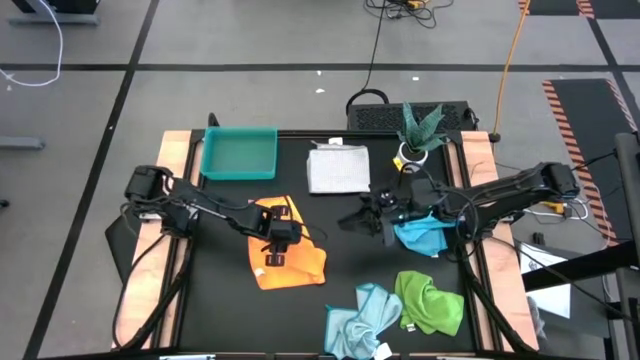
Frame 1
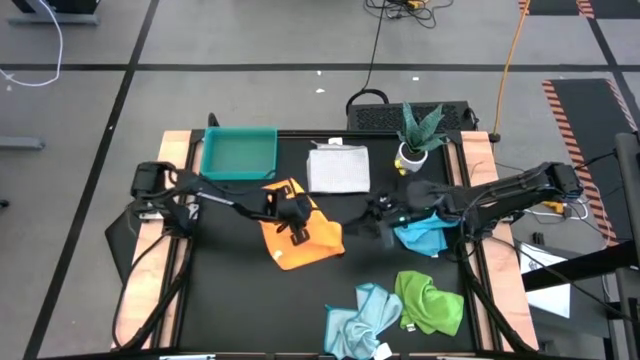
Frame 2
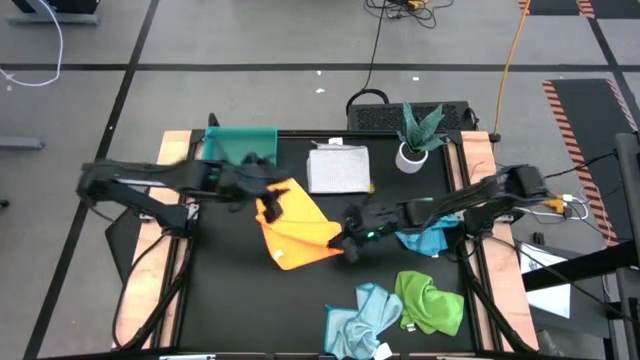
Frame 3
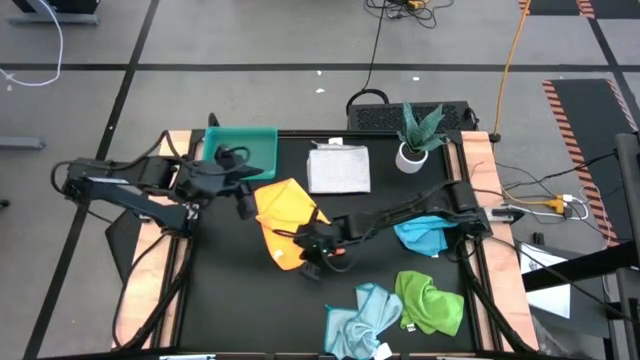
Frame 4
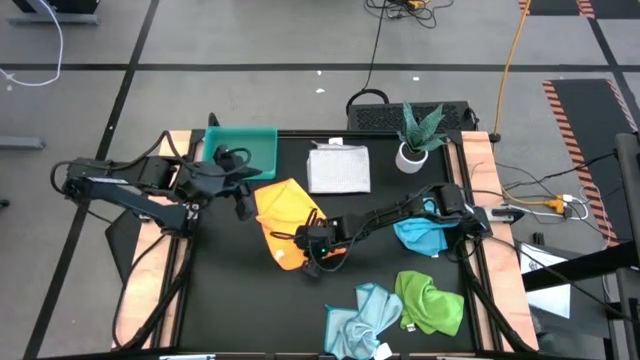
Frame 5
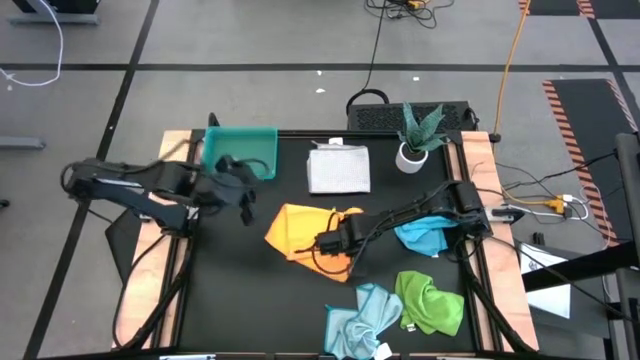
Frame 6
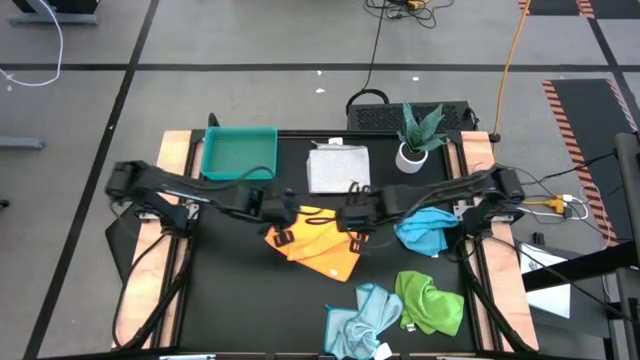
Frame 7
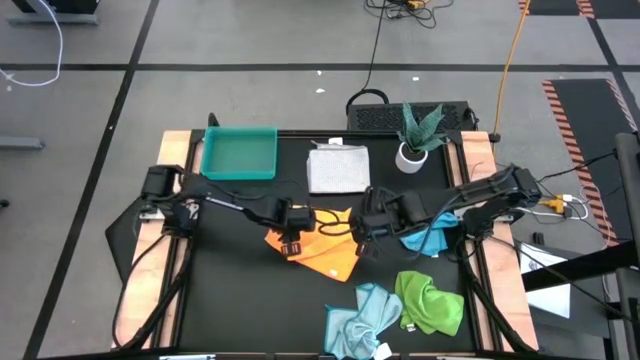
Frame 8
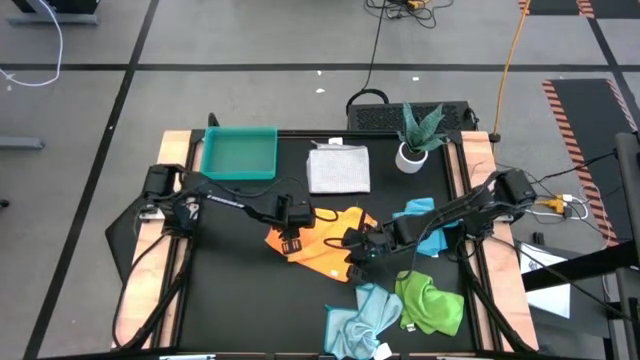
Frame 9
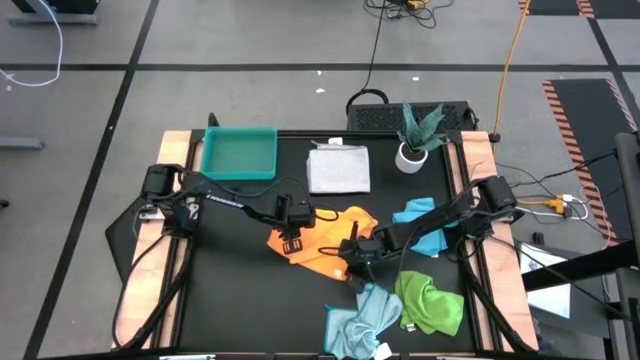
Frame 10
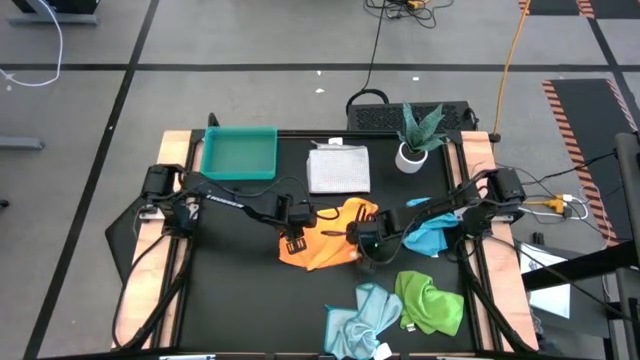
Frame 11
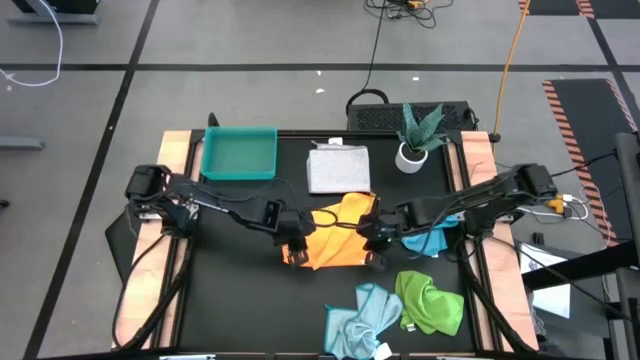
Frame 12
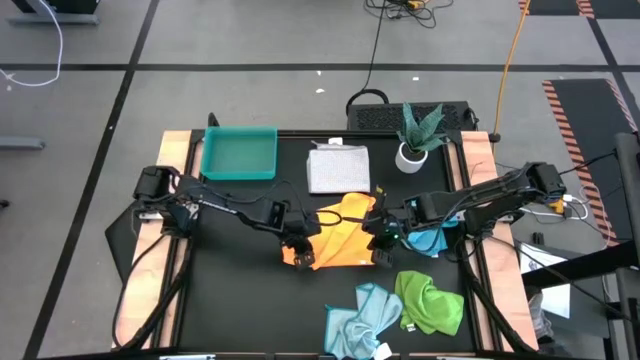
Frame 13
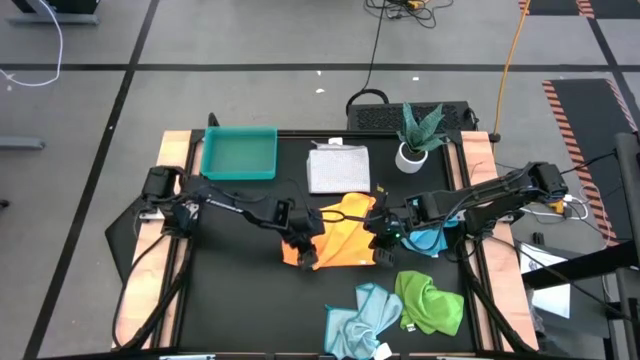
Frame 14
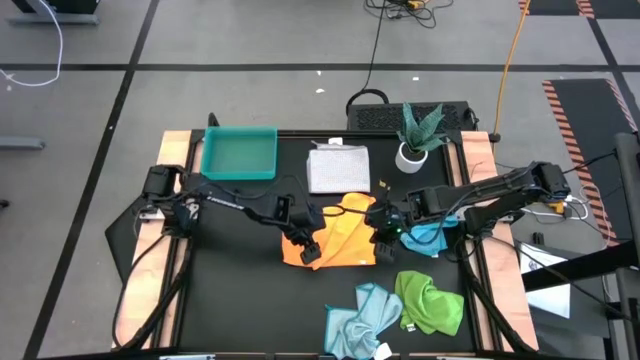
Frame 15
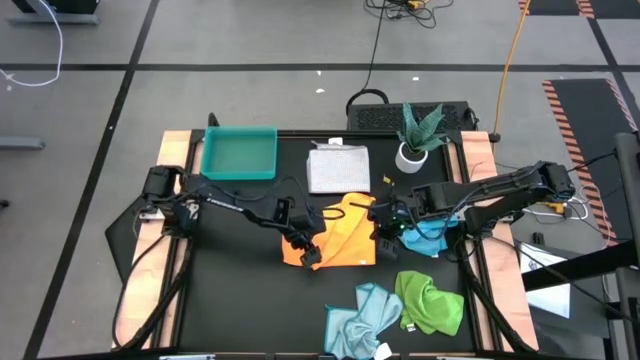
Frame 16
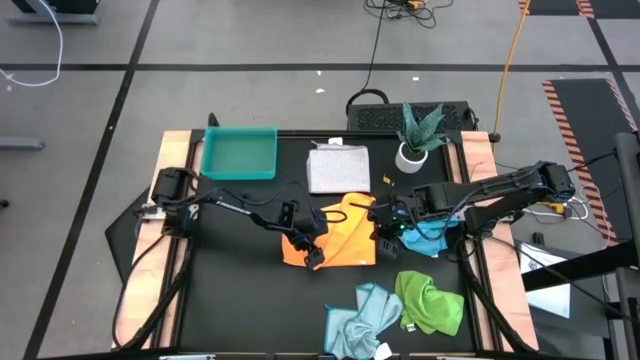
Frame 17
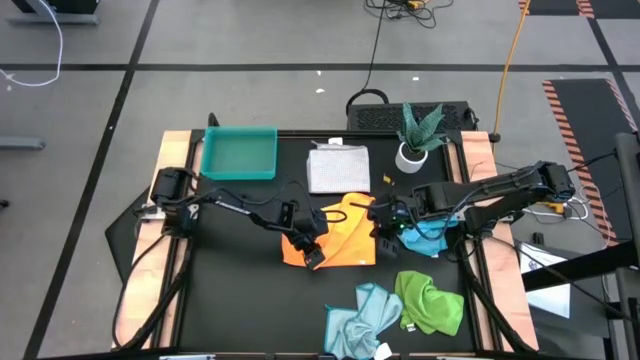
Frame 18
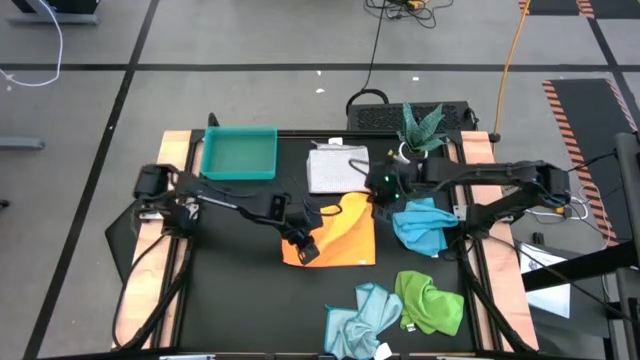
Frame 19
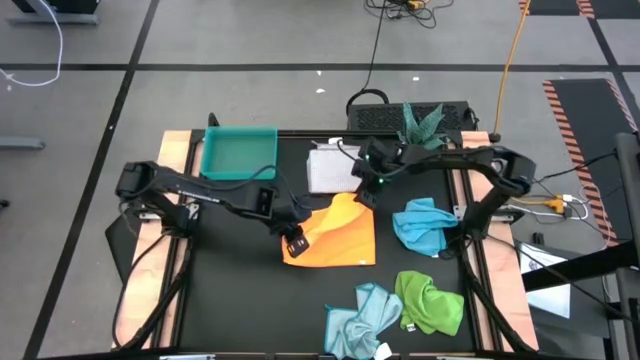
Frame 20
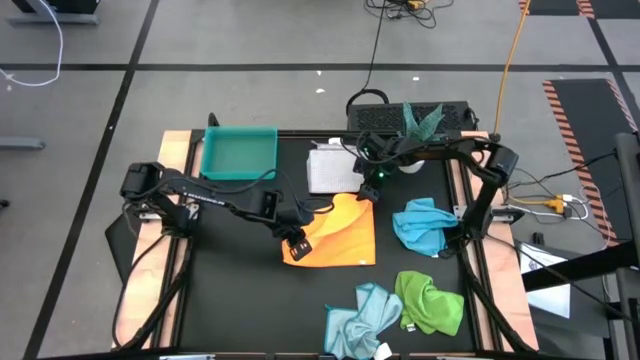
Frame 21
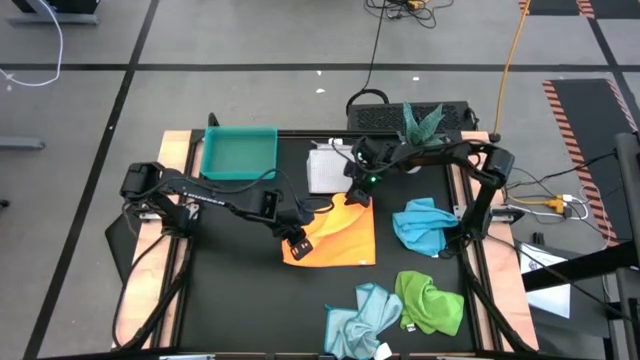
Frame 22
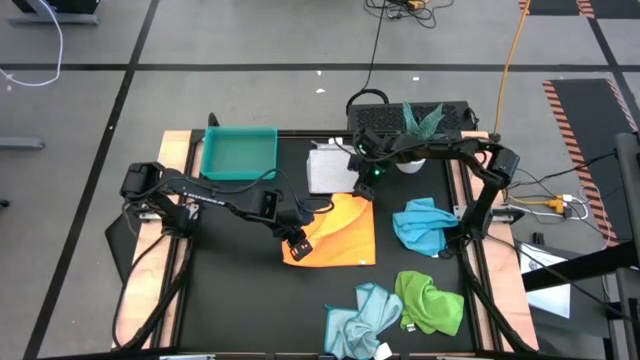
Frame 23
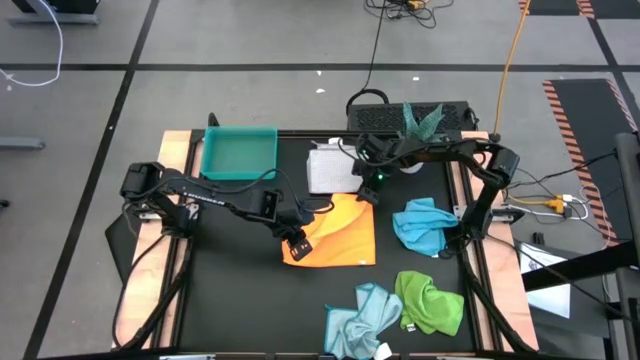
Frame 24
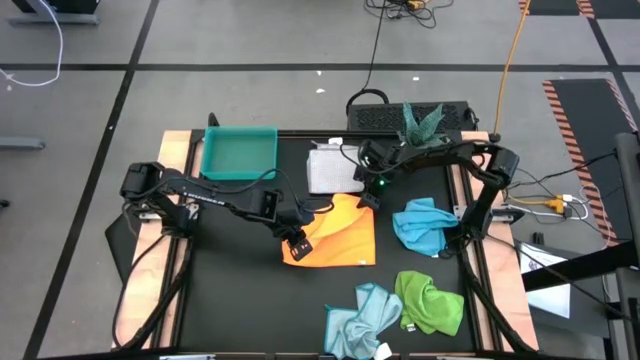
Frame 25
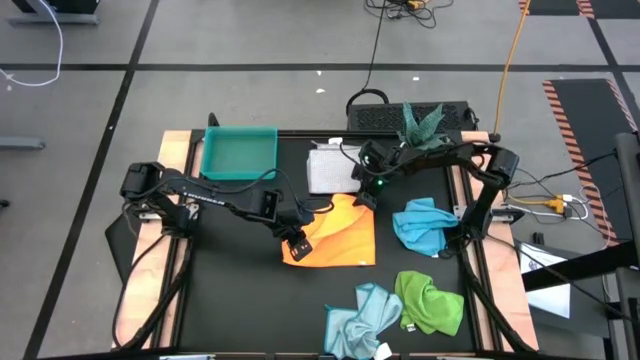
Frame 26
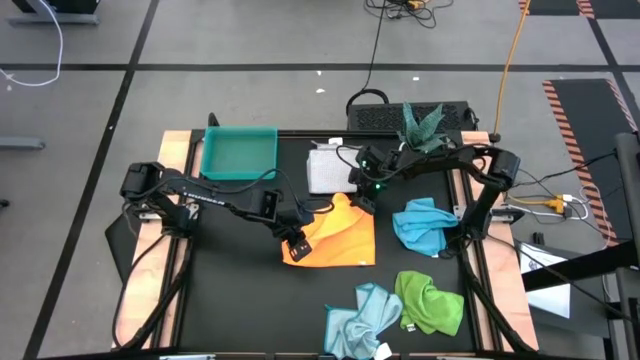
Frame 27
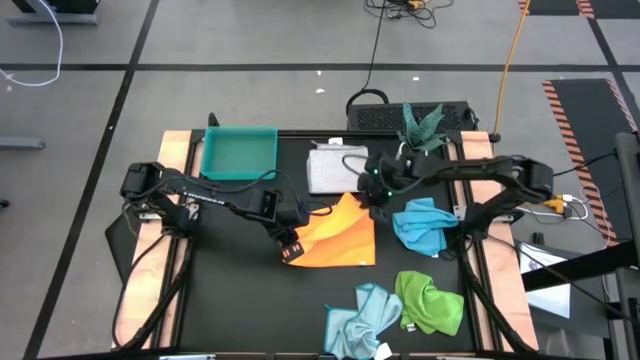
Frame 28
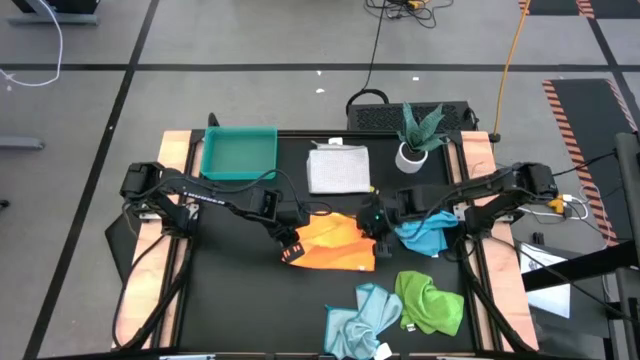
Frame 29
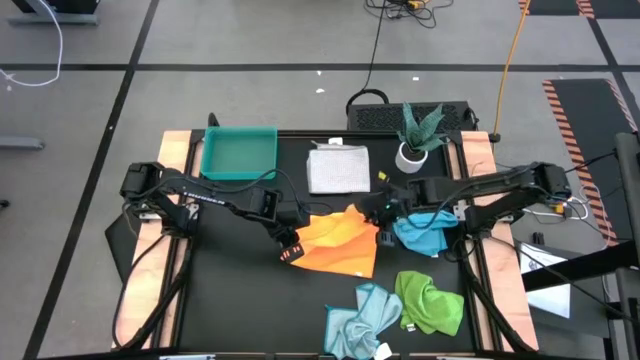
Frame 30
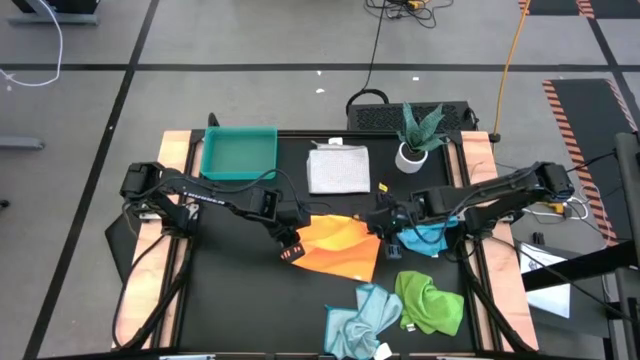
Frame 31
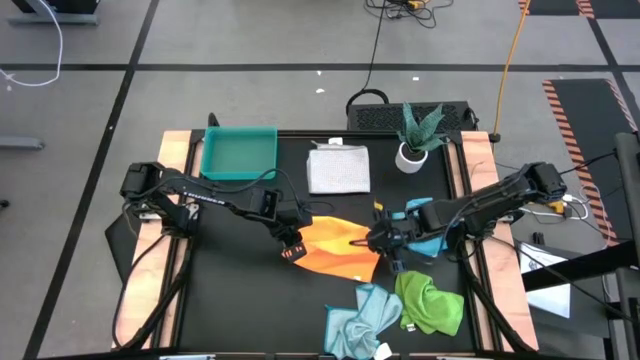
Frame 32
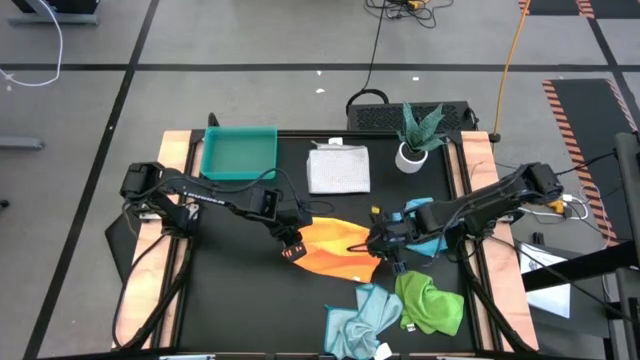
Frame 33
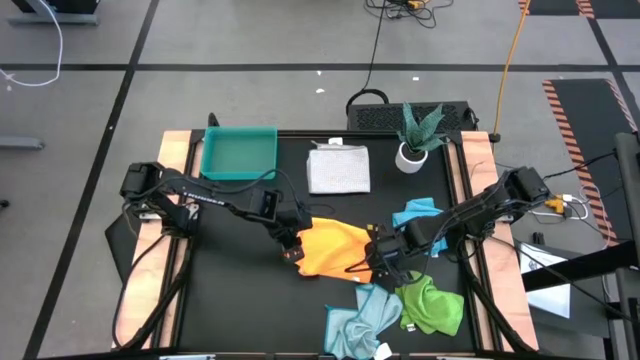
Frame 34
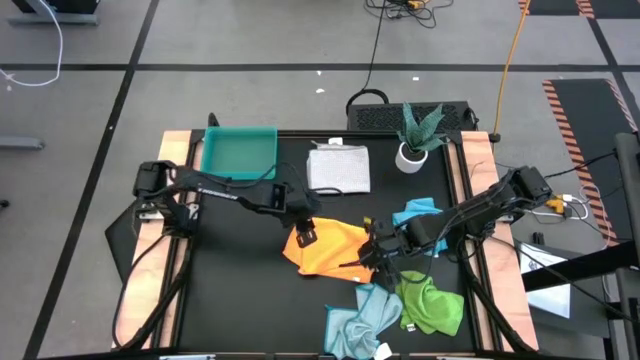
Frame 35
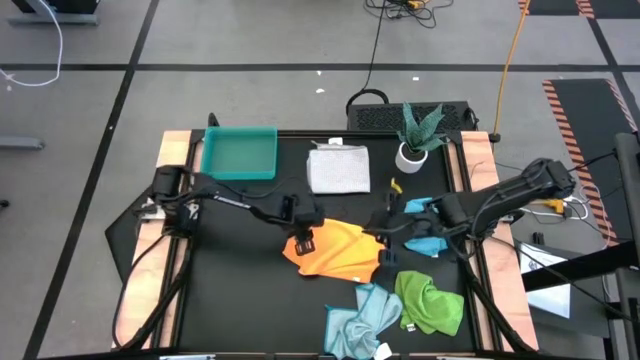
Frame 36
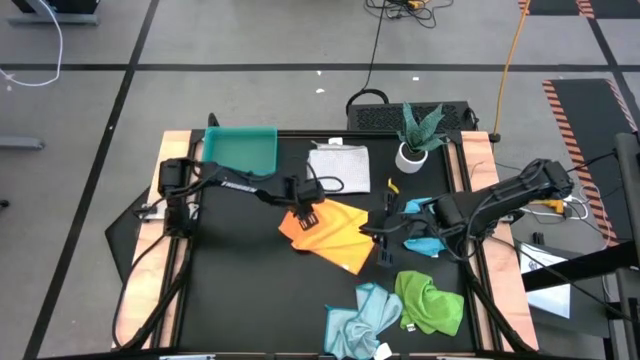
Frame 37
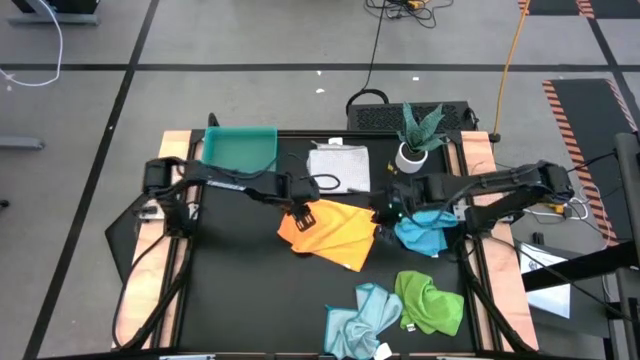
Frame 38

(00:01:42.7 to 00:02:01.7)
Task: Fold microfiber towels
Fold the orange microfiber towel

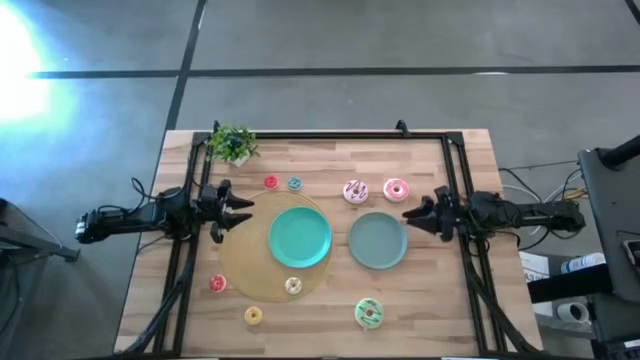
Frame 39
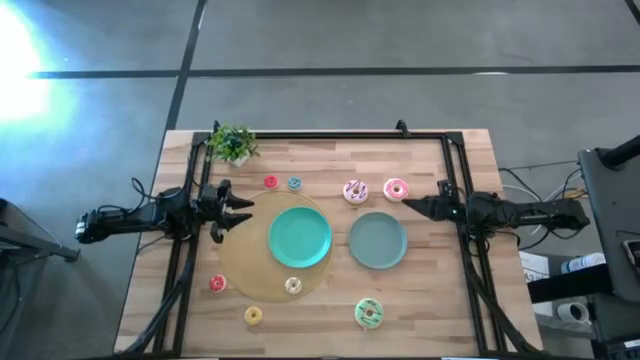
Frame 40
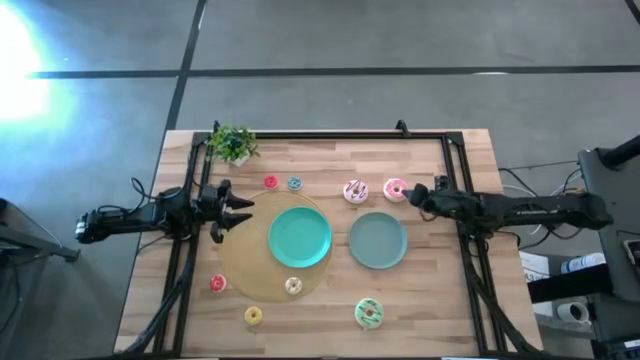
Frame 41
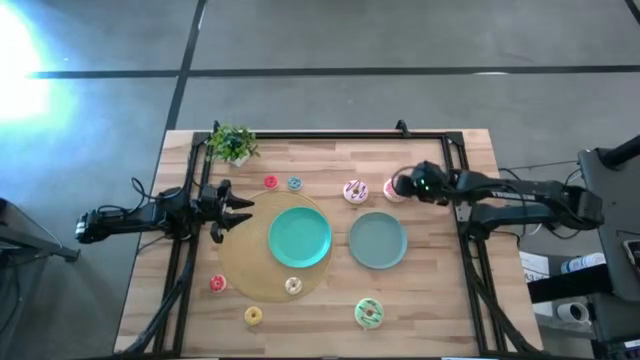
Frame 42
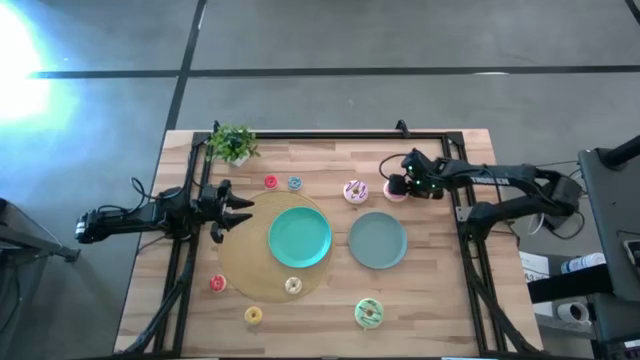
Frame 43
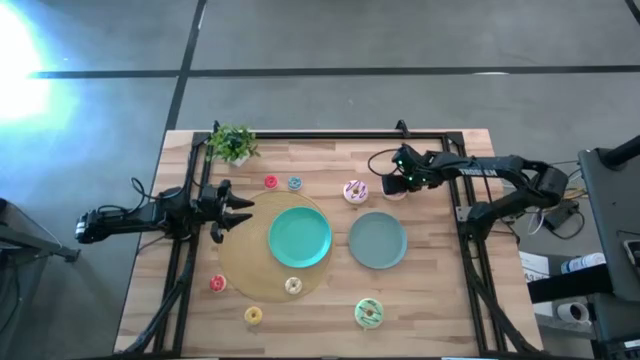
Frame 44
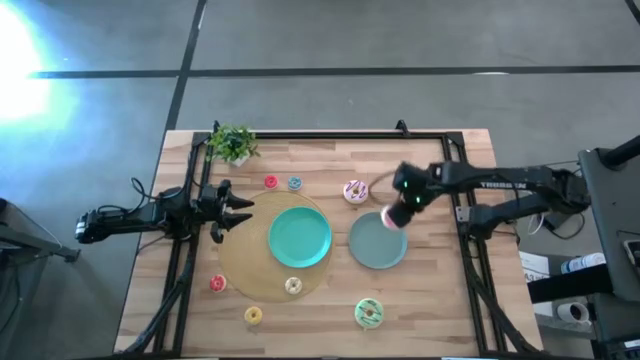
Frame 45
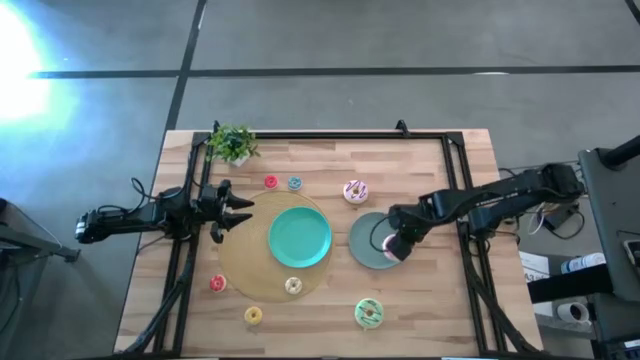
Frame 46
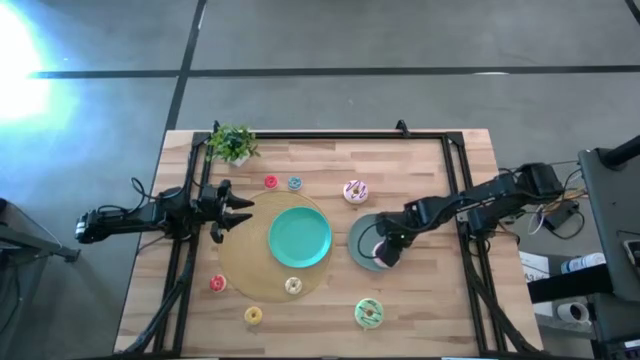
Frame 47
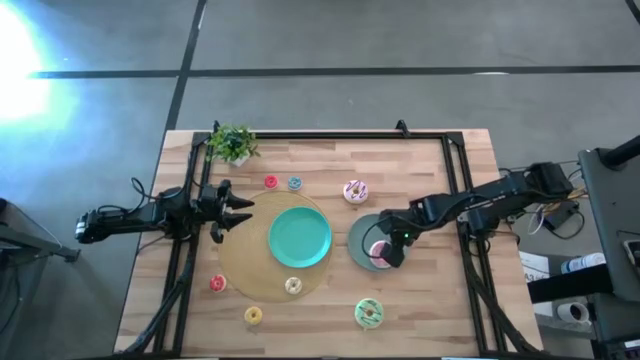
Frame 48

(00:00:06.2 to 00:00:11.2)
Task: Pick & Place donuts
Put the large pink donut on the right plate
